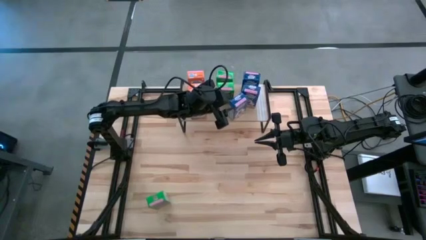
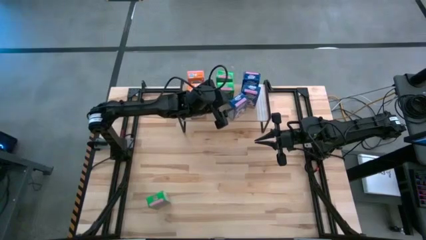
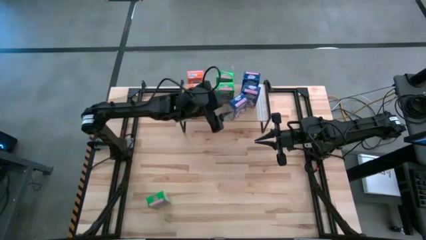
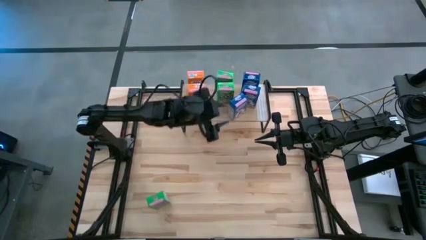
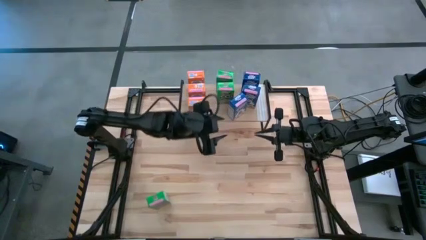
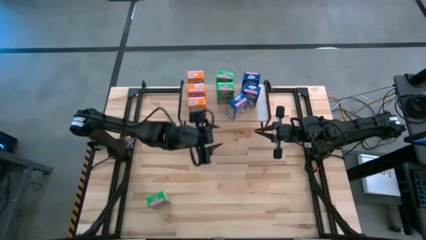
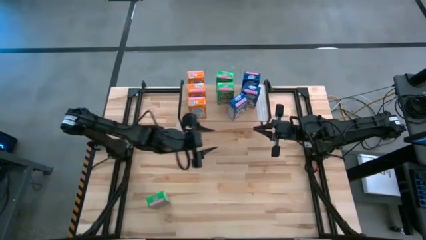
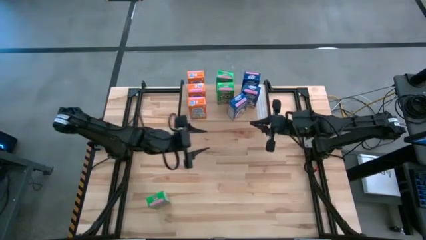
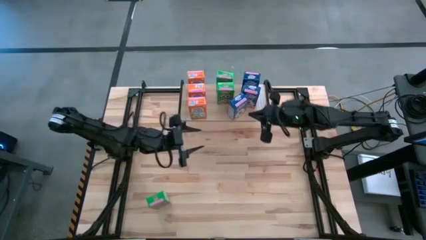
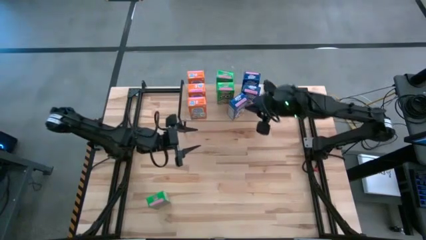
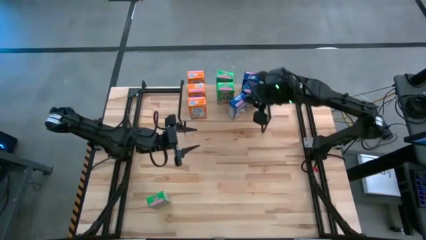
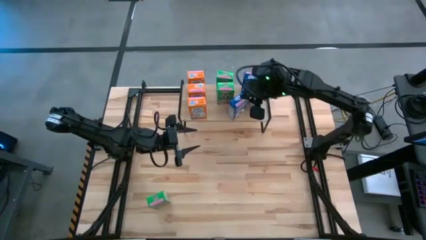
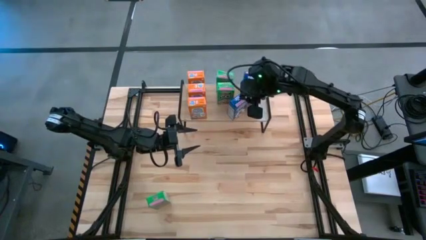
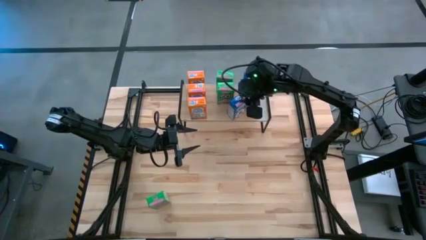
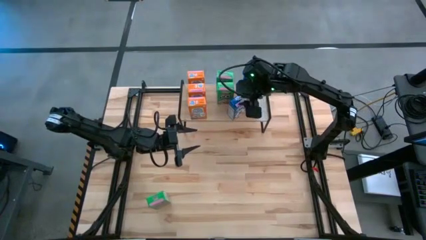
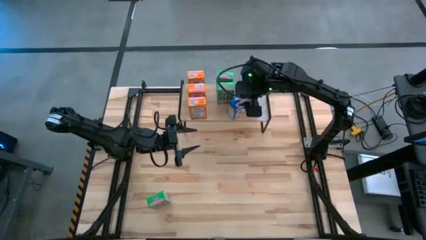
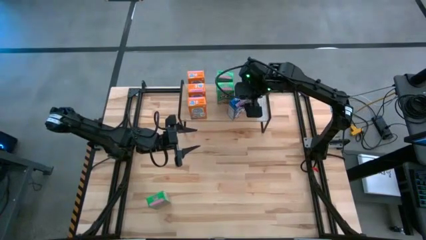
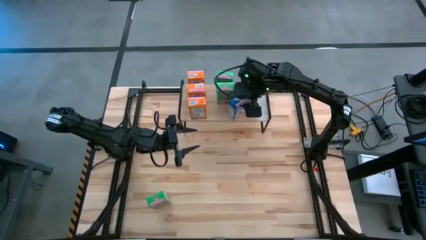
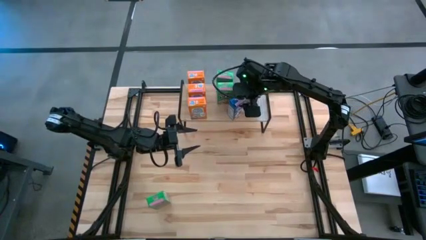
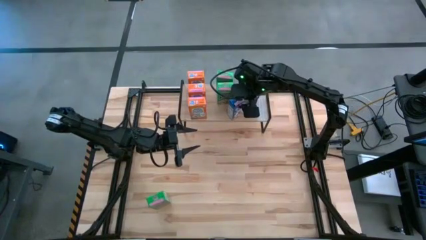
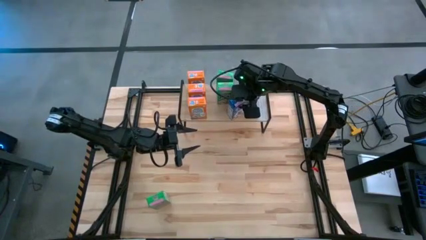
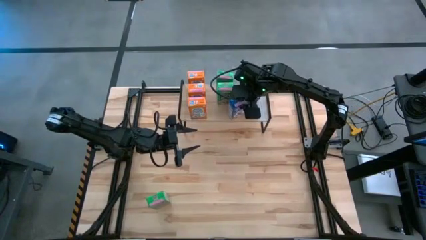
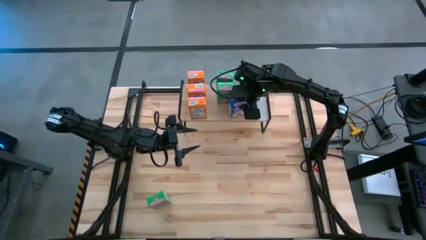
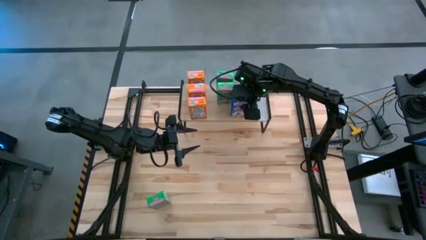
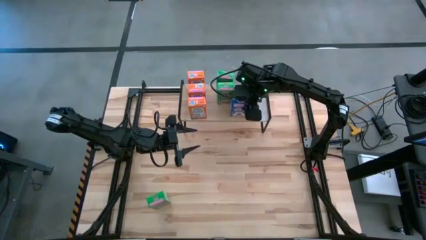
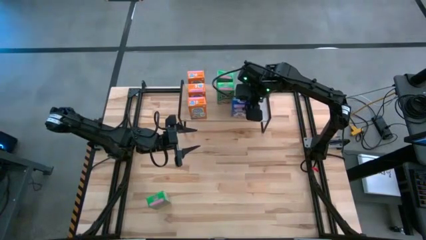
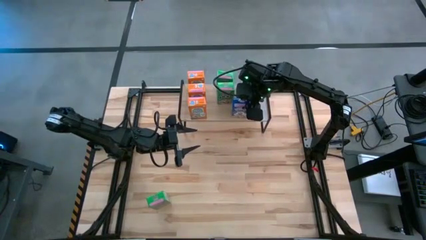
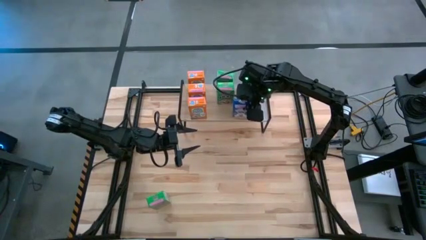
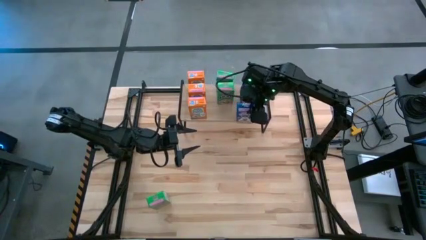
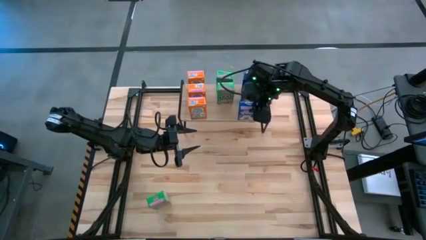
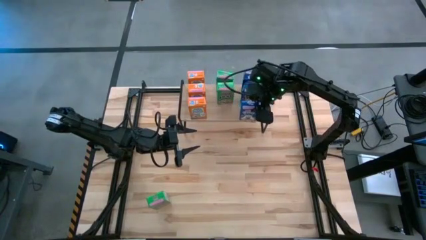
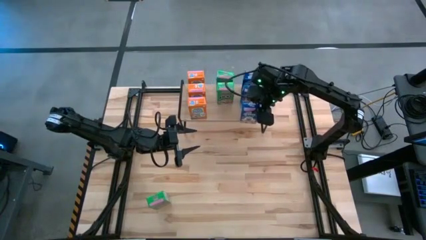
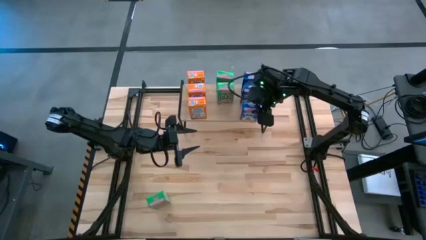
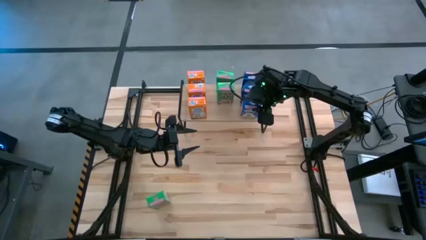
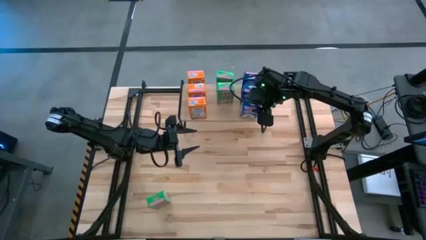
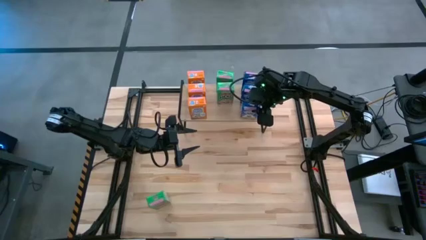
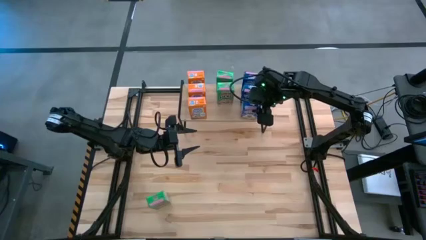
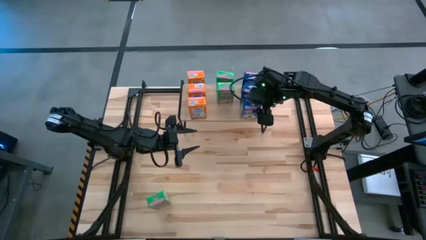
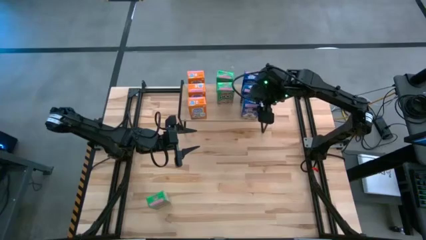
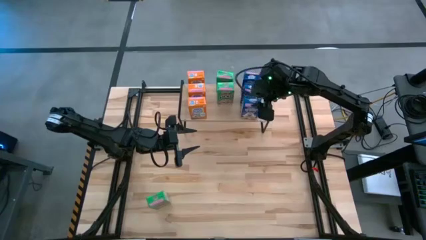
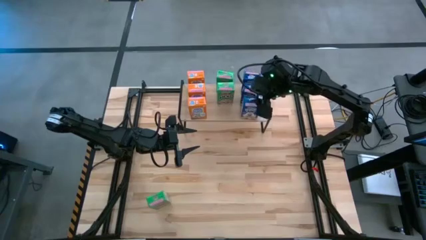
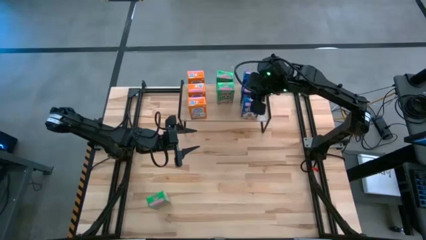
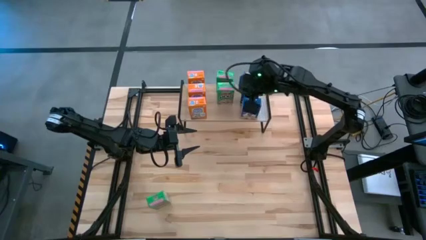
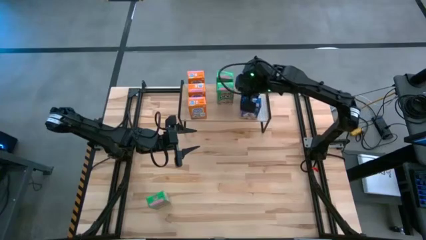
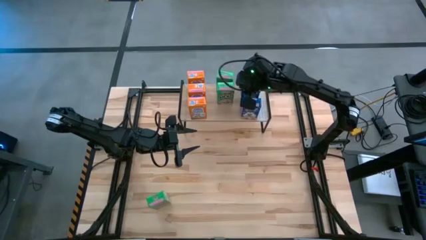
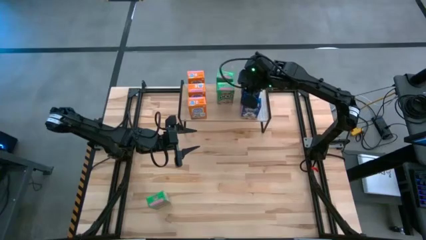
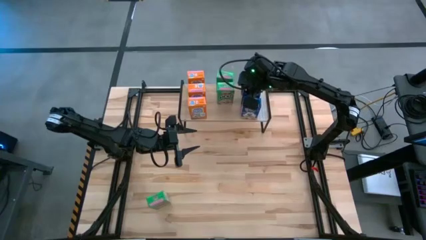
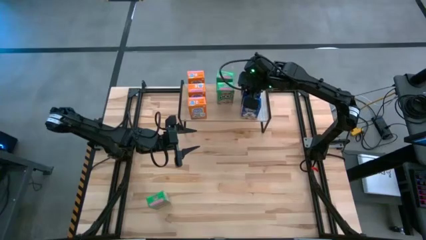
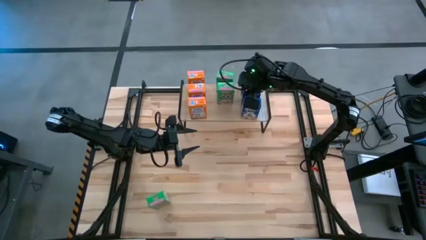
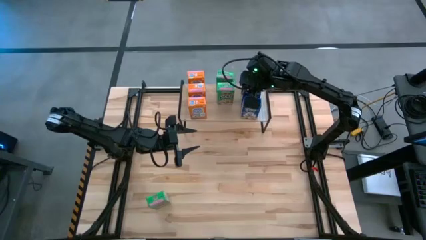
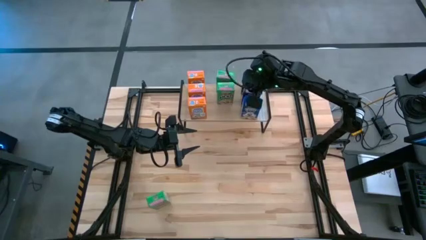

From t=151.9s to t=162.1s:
Task: Stack cereal on shelf
Put the blue cereal box aligned with the other blue cereal box on the shelf
